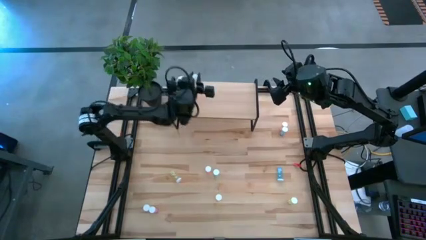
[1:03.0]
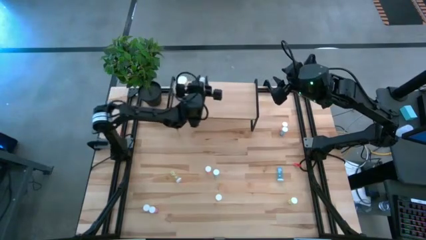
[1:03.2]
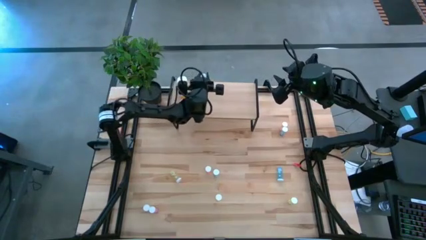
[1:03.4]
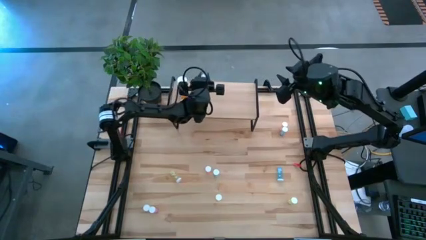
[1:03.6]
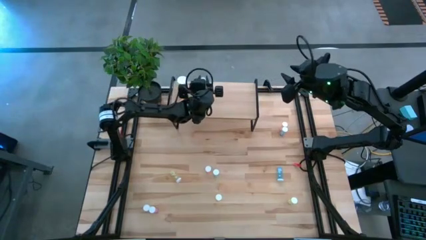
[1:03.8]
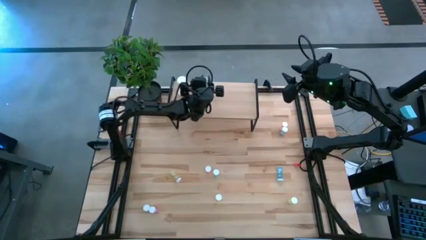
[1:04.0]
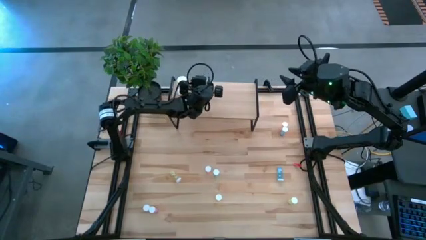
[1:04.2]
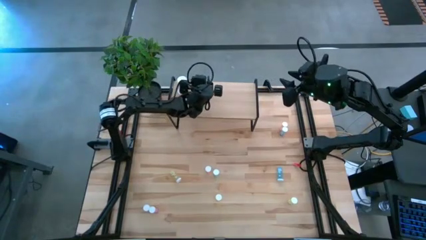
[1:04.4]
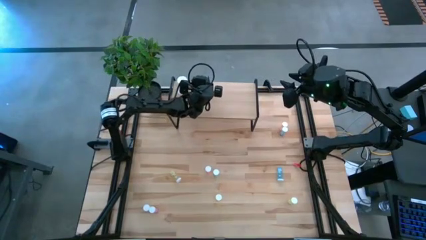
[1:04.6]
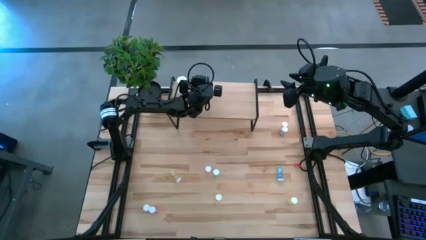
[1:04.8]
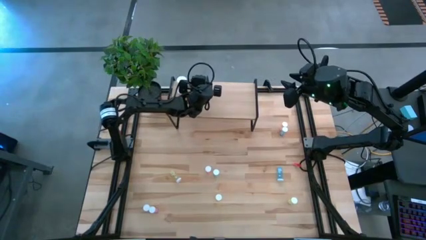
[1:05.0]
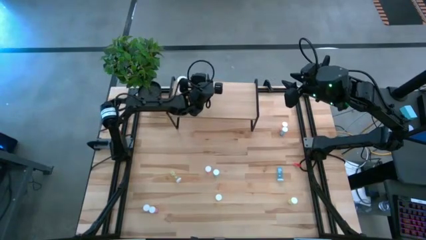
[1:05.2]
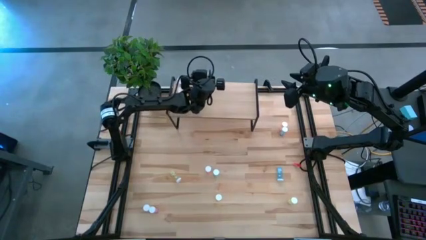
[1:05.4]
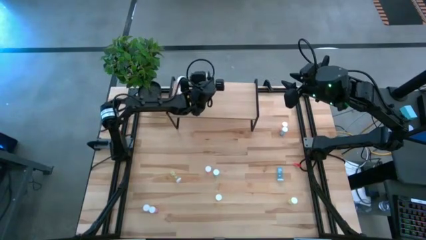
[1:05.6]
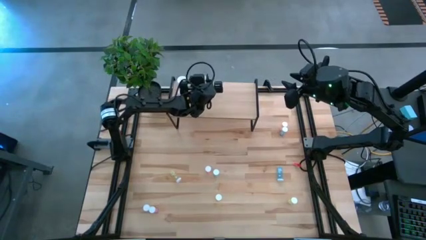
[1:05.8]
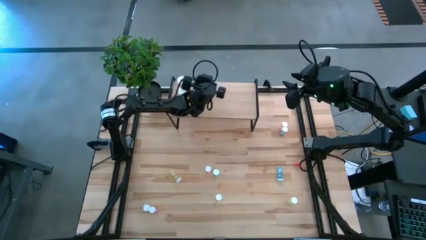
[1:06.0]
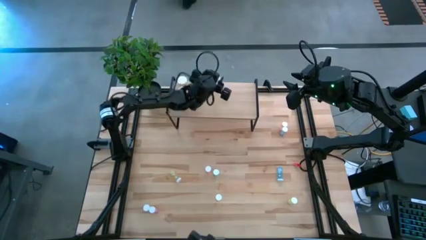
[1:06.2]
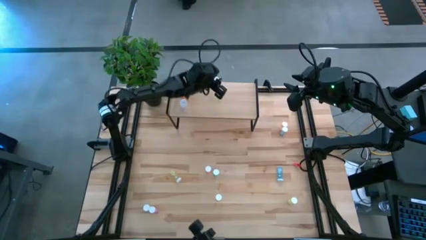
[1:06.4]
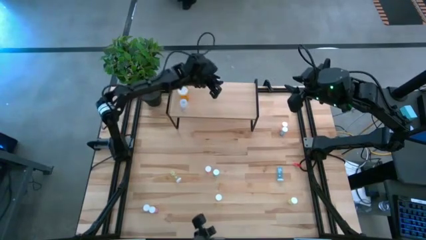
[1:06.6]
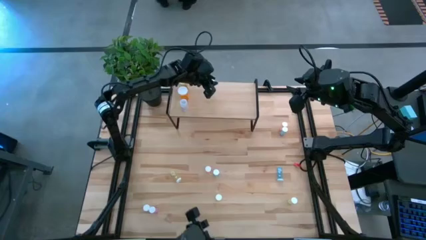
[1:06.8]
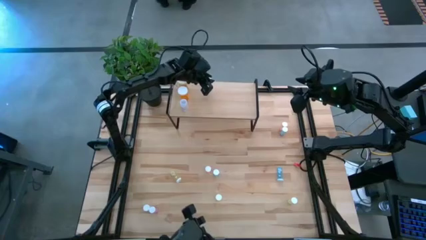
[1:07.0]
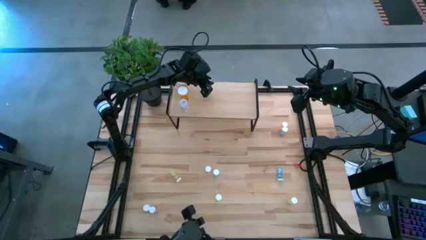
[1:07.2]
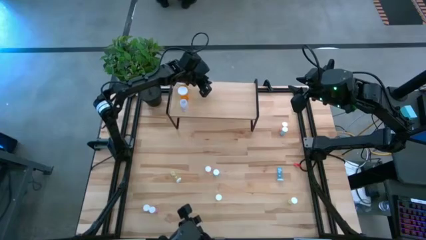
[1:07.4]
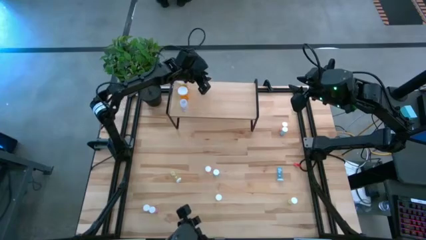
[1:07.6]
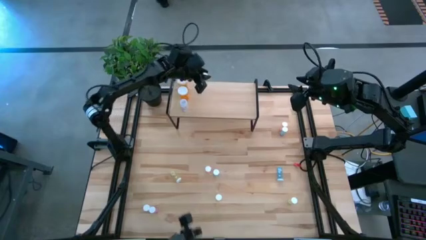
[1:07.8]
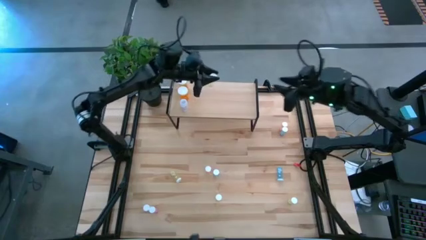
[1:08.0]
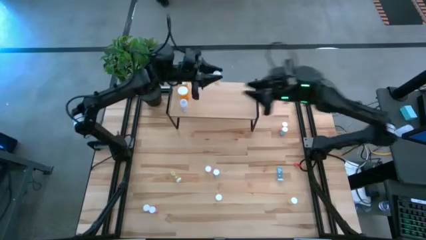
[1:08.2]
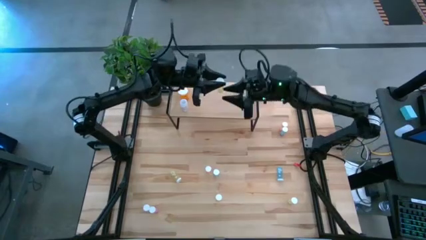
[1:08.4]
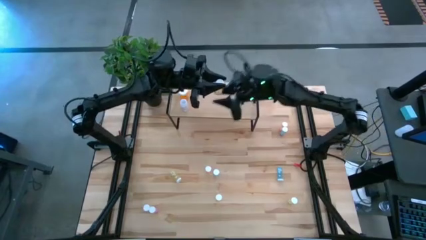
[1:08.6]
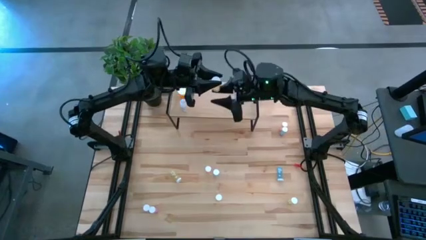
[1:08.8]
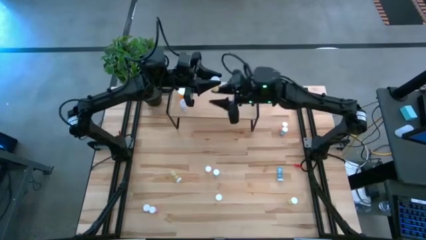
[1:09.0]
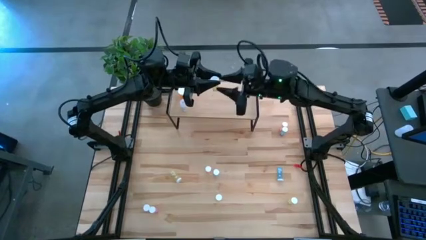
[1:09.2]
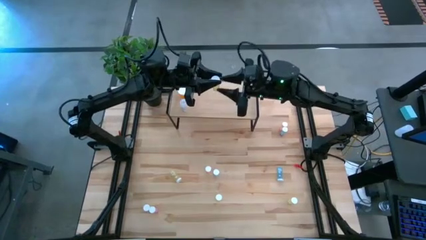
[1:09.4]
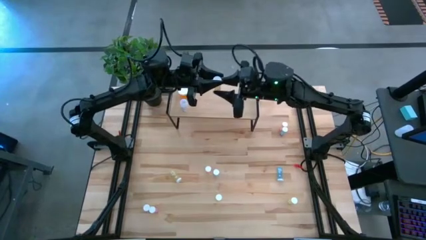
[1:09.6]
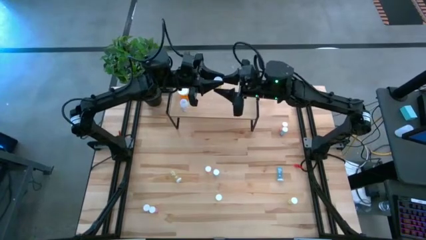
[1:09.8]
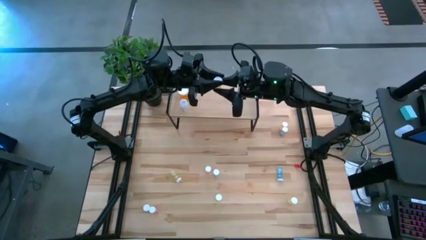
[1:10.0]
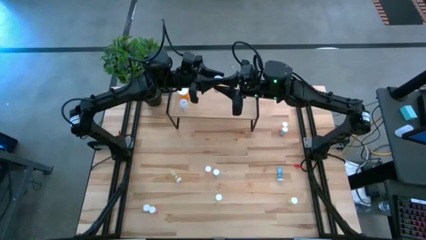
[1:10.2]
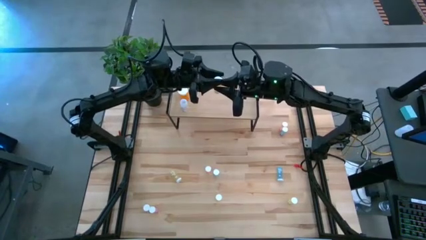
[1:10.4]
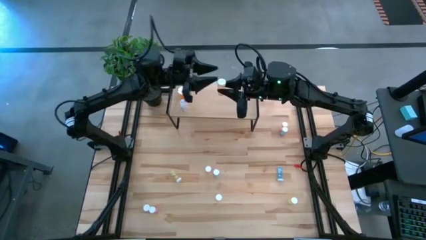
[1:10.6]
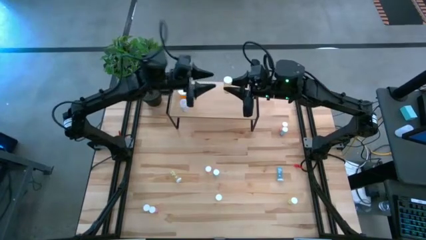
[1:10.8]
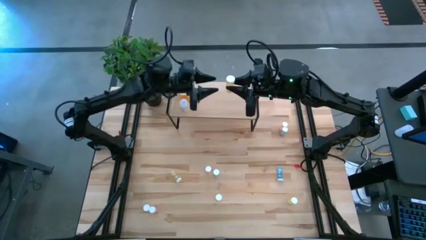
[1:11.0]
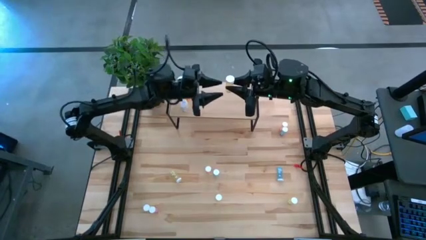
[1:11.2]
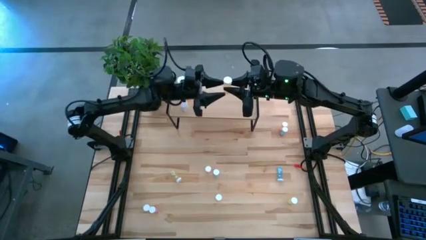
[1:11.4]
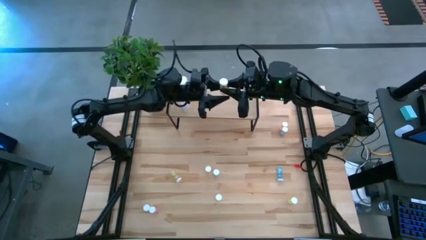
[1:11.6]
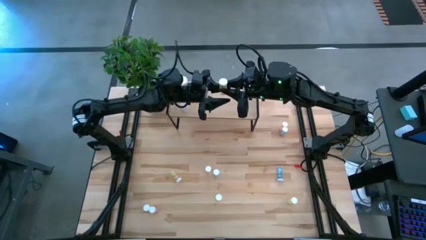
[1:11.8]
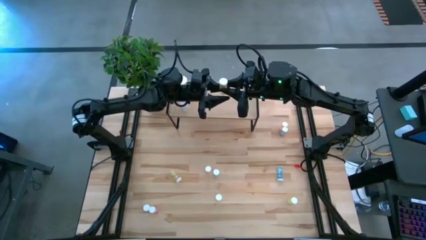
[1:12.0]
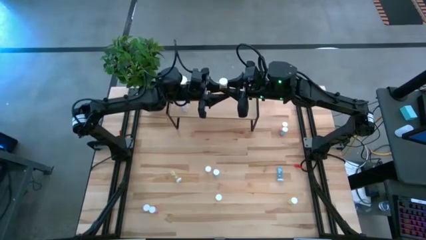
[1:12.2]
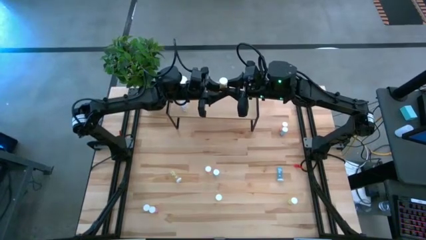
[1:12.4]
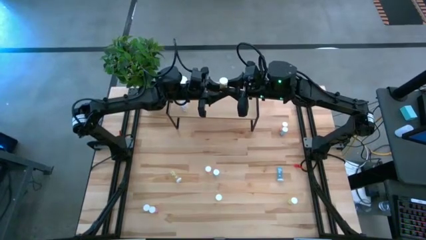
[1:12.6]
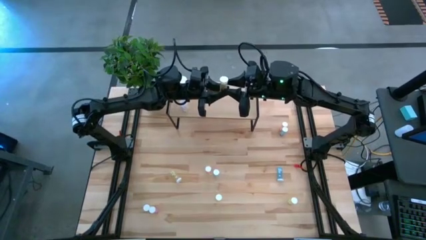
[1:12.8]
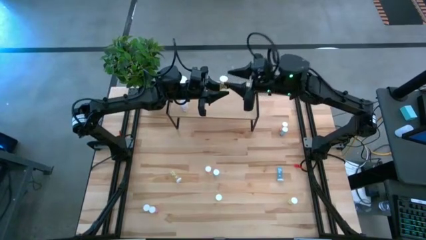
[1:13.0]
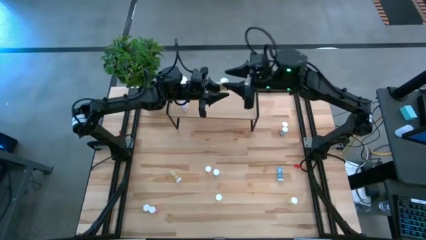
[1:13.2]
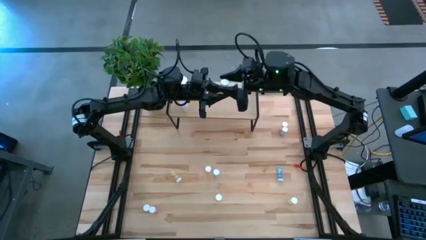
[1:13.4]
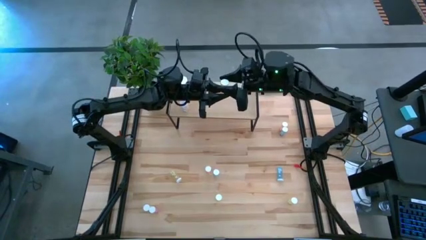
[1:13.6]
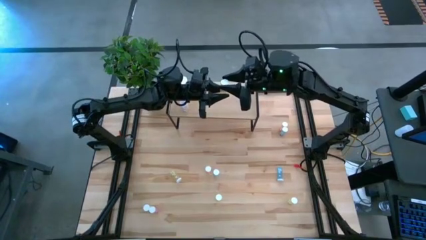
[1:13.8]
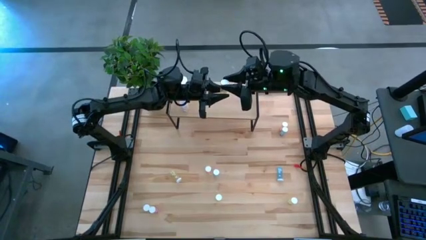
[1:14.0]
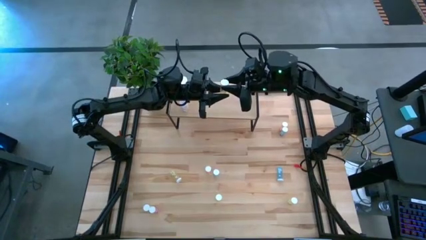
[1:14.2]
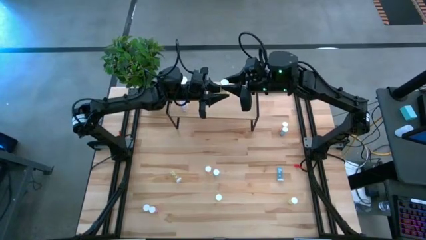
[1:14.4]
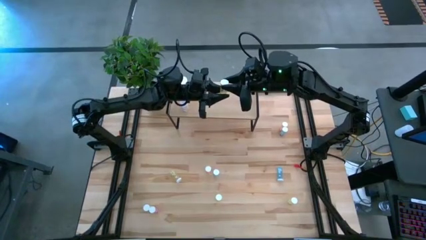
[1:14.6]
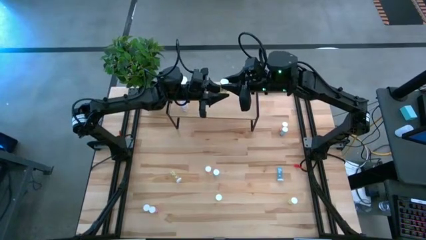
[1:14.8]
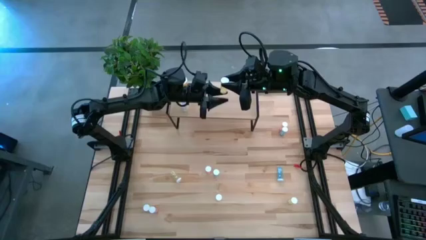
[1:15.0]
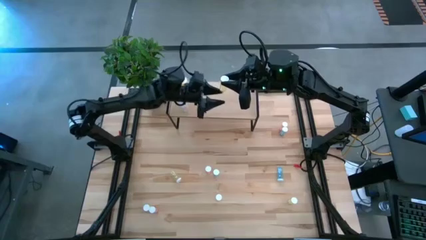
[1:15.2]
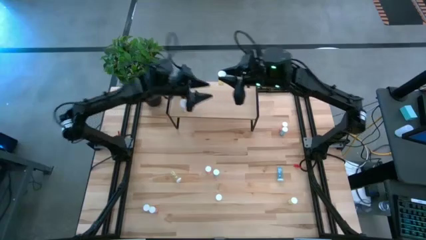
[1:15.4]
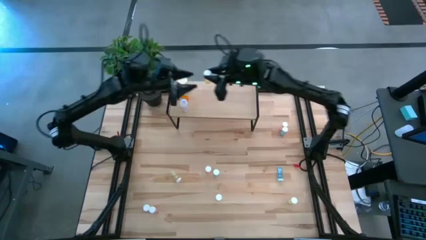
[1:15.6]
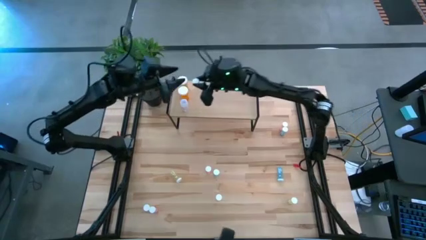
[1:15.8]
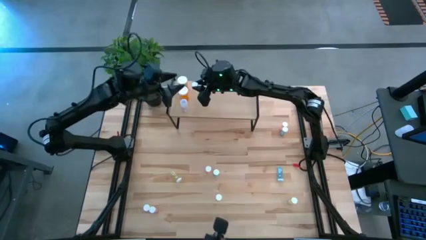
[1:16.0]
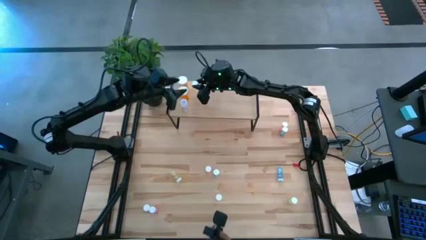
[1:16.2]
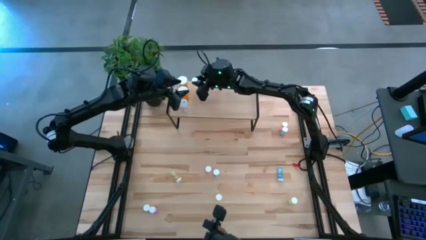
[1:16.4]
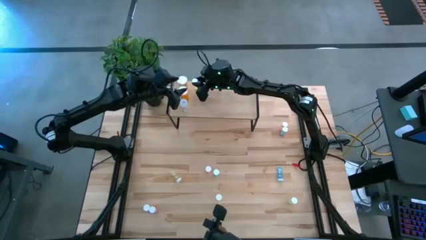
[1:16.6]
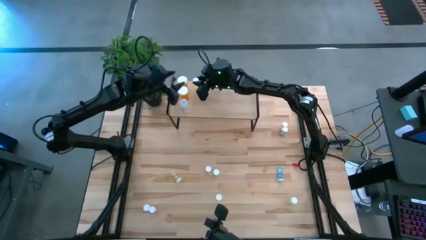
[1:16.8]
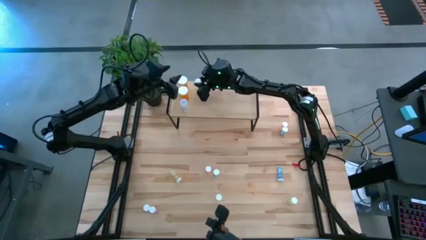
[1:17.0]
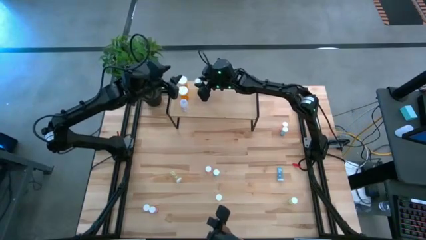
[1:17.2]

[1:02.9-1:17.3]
Task: Pick and place medicine bottles onto shelf by color
Put the yellow pill bottle on the shelf

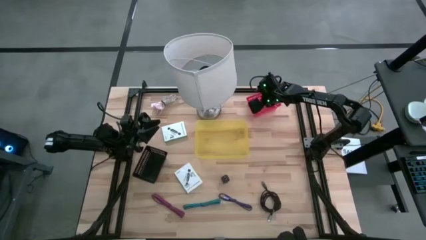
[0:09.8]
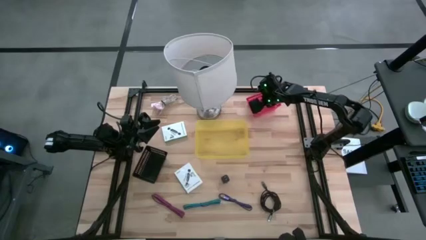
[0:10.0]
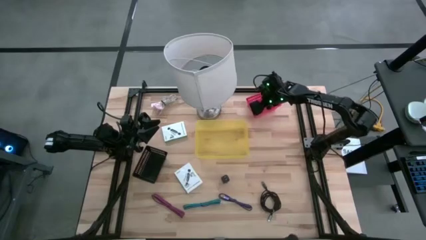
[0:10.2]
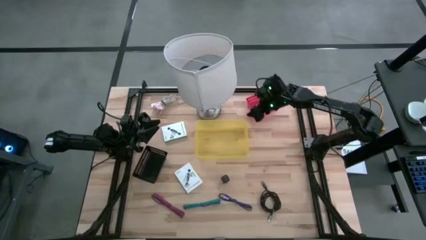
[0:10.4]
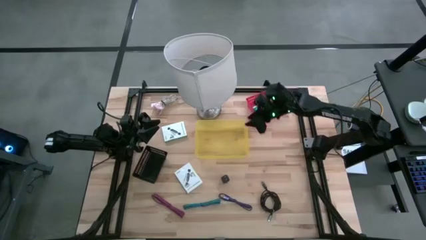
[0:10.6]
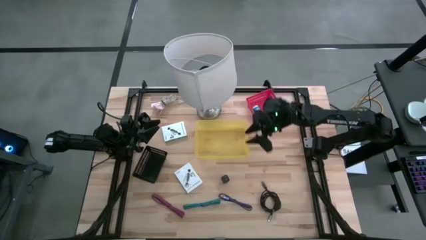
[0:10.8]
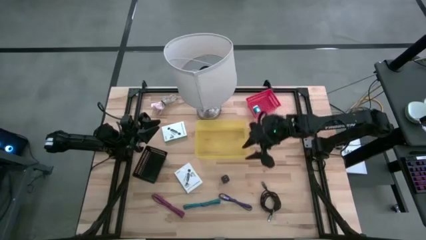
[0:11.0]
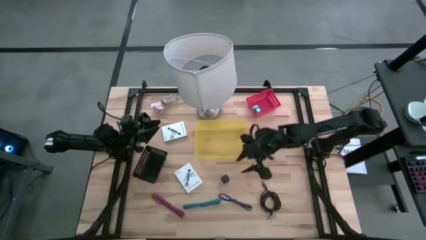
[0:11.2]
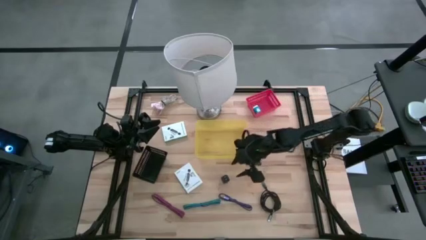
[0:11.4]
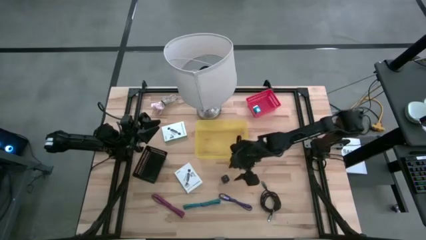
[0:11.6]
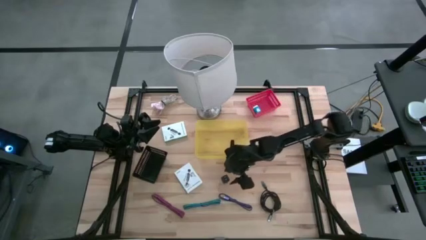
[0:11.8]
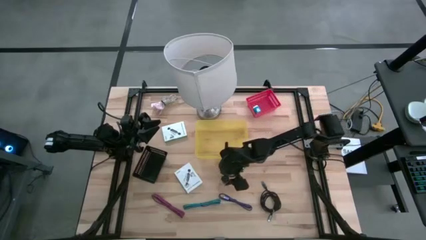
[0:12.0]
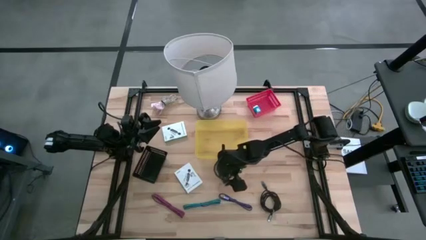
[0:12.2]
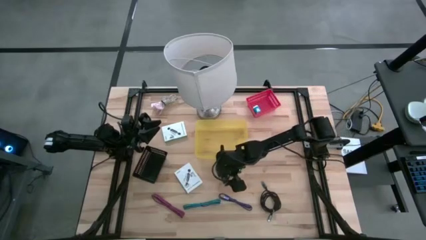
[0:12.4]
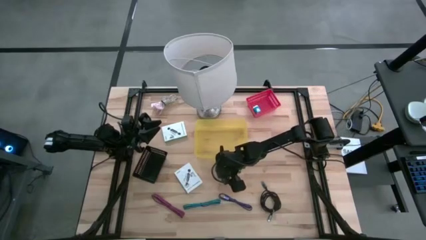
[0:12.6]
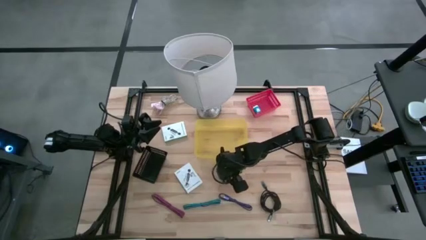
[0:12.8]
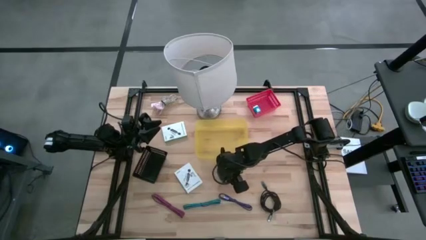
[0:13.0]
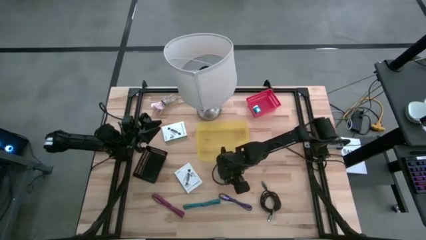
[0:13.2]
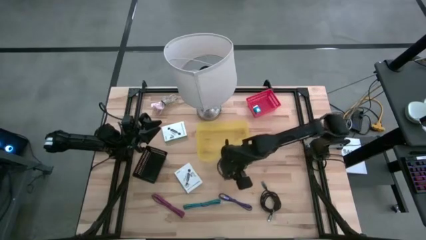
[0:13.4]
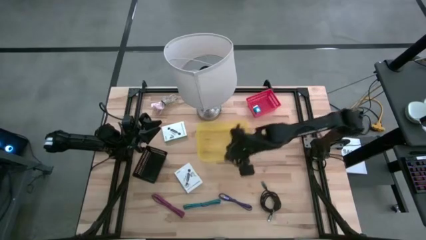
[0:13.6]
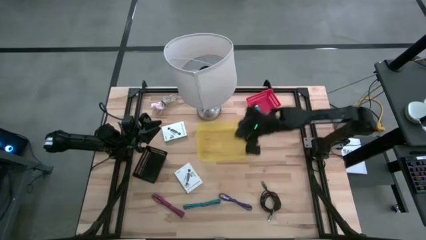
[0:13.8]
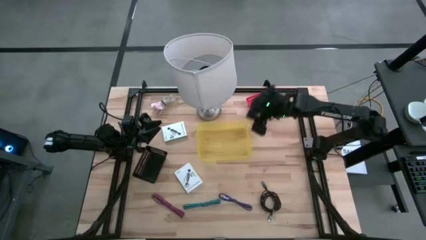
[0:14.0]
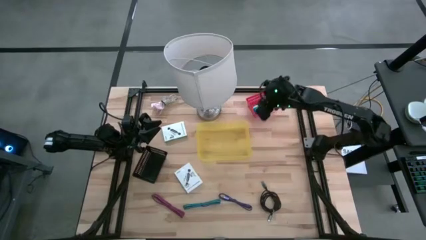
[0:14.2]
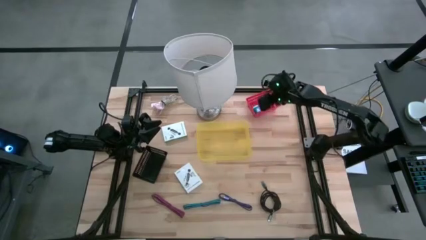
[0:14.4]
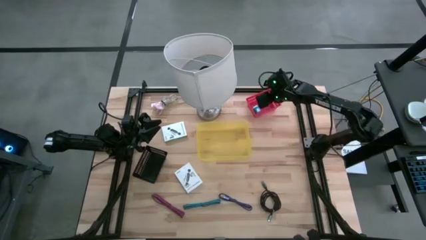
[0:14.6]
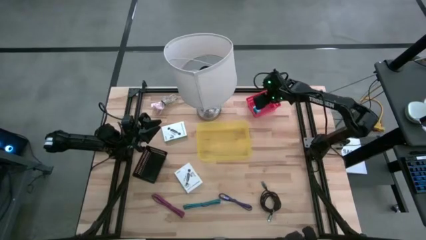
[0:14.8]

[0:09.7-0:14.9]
Task: Pick and place items into bin
Put the black charger adapter into the red bin
